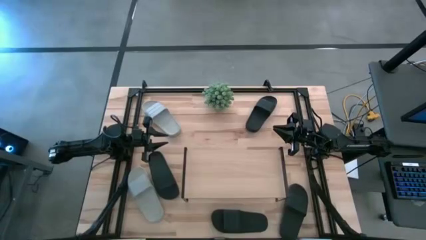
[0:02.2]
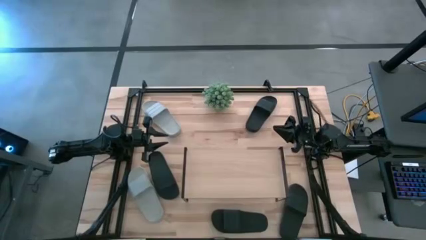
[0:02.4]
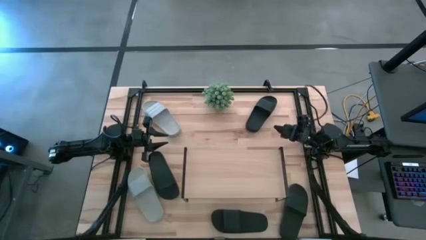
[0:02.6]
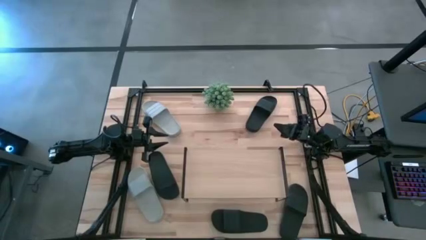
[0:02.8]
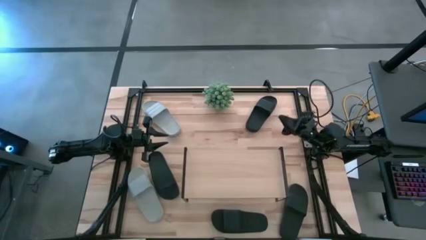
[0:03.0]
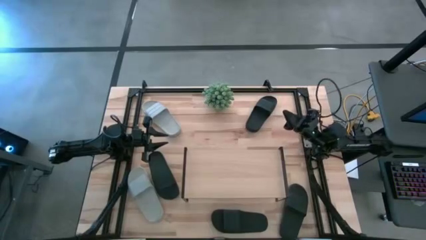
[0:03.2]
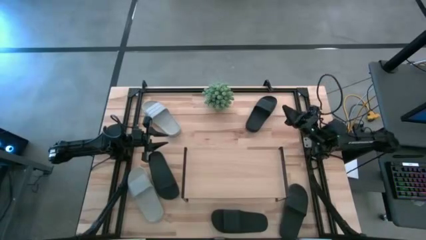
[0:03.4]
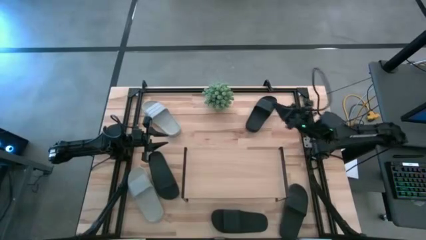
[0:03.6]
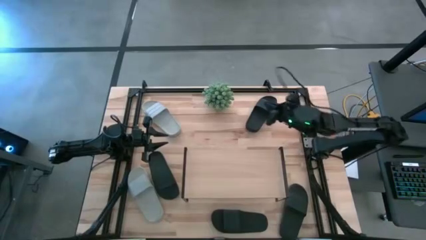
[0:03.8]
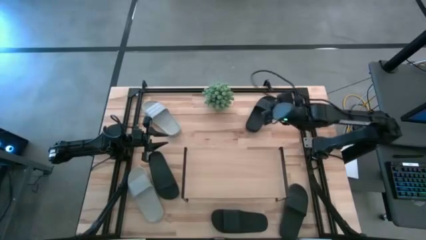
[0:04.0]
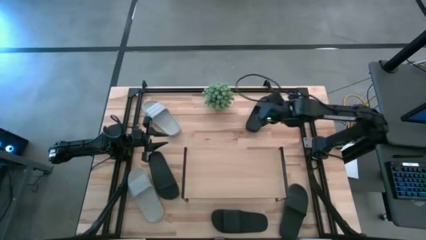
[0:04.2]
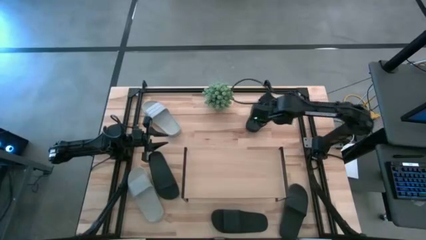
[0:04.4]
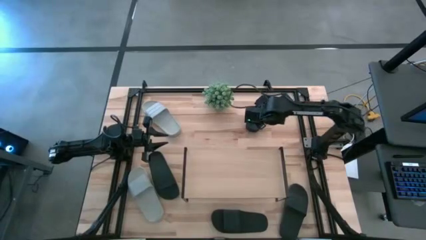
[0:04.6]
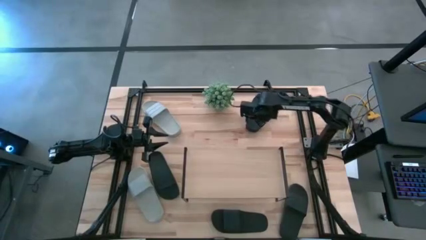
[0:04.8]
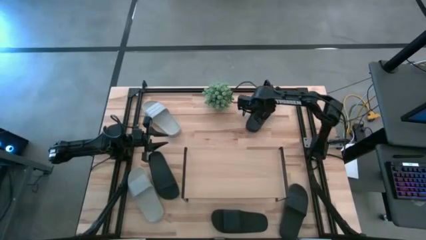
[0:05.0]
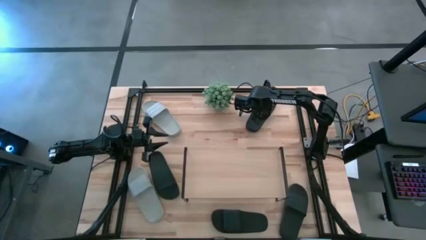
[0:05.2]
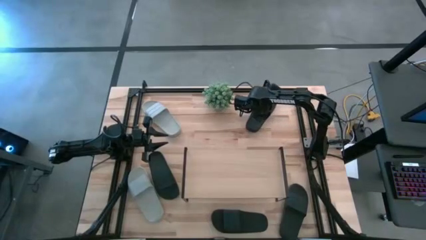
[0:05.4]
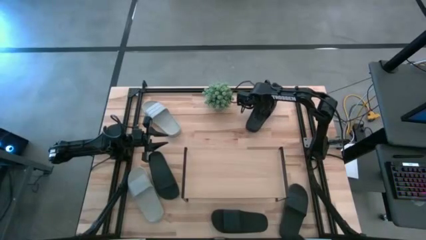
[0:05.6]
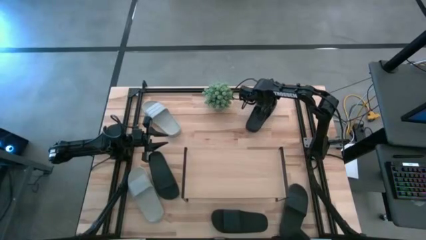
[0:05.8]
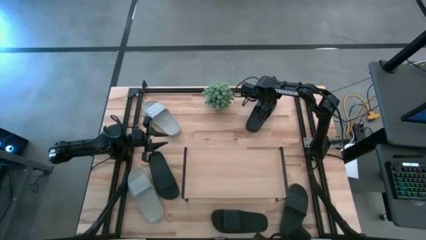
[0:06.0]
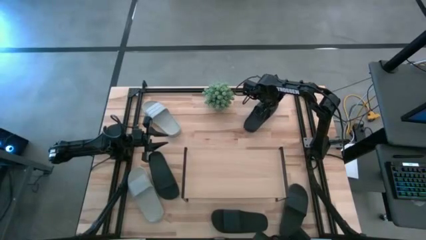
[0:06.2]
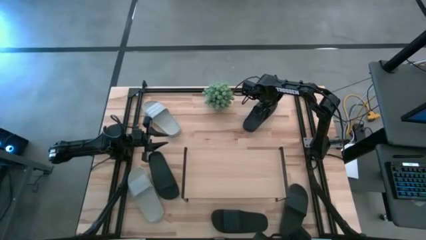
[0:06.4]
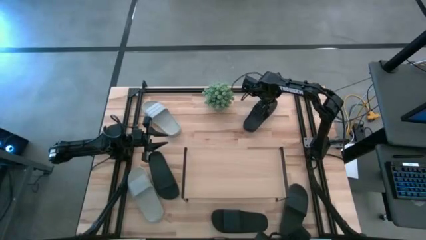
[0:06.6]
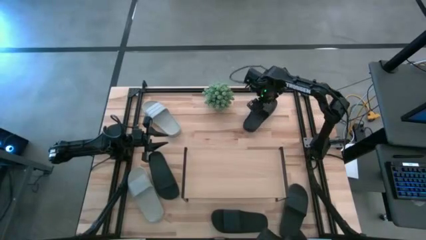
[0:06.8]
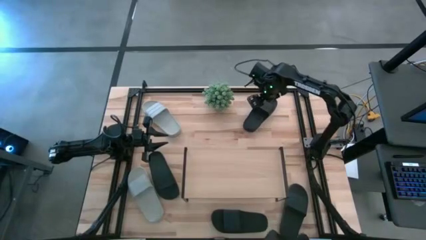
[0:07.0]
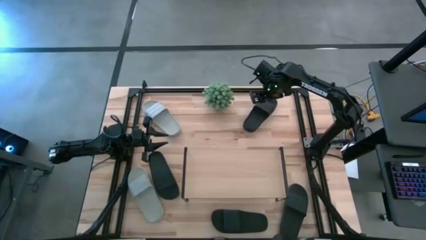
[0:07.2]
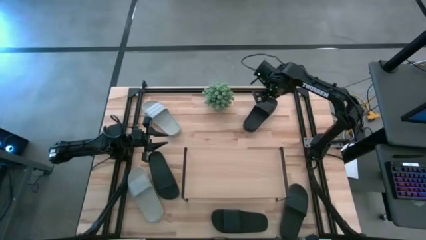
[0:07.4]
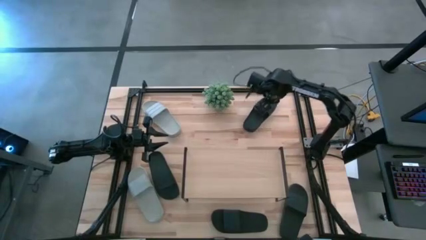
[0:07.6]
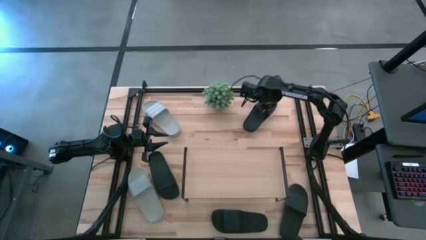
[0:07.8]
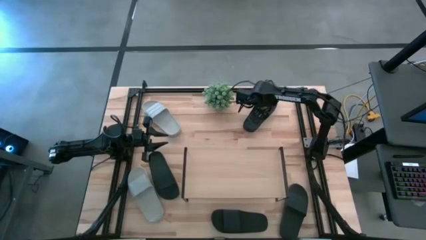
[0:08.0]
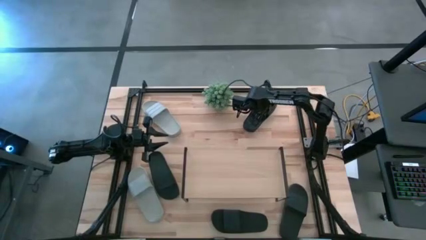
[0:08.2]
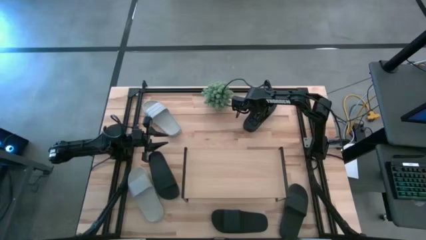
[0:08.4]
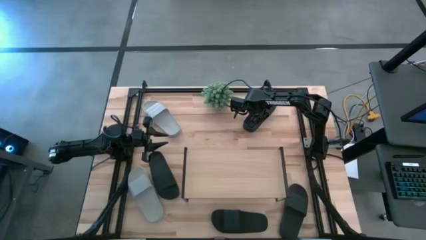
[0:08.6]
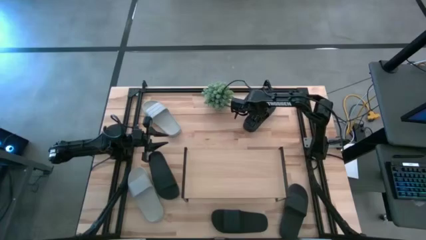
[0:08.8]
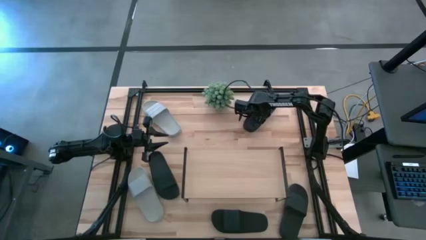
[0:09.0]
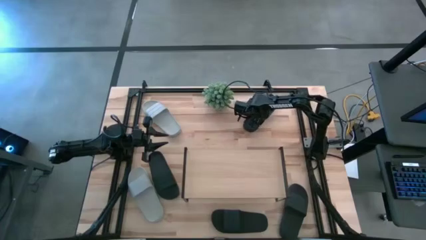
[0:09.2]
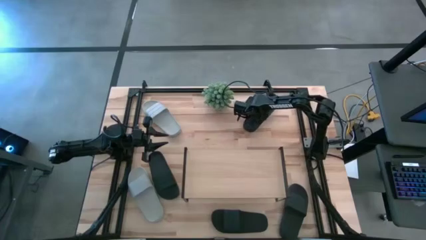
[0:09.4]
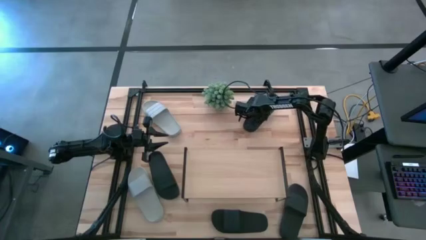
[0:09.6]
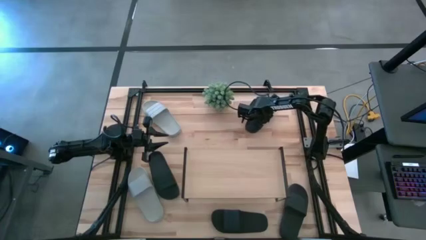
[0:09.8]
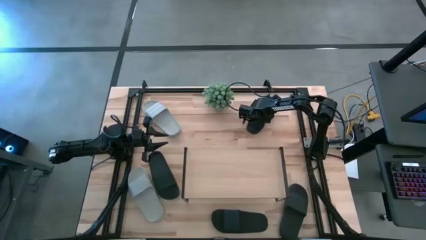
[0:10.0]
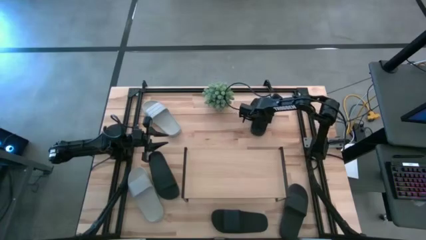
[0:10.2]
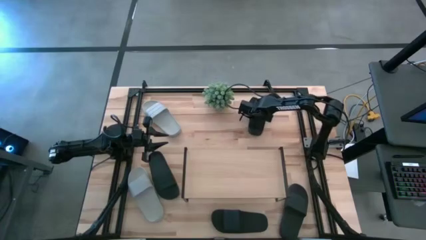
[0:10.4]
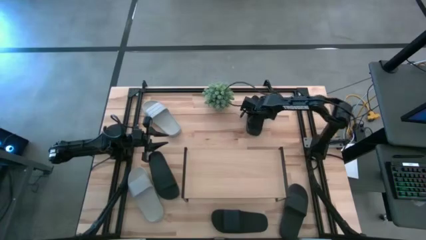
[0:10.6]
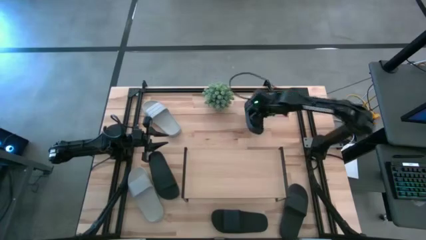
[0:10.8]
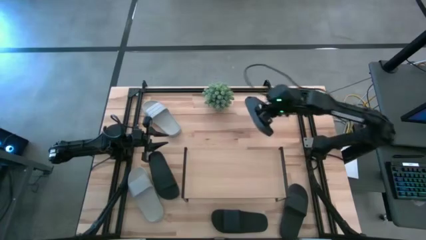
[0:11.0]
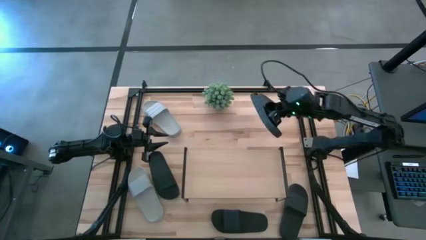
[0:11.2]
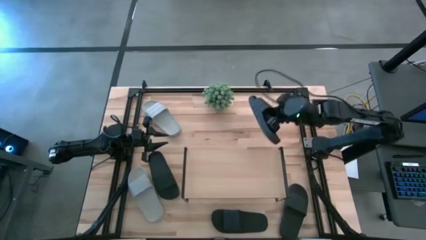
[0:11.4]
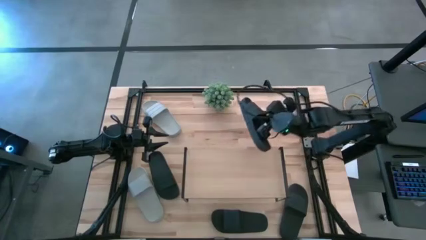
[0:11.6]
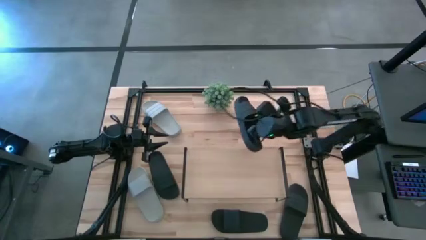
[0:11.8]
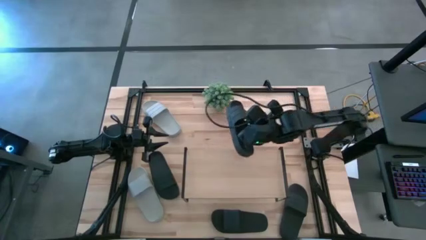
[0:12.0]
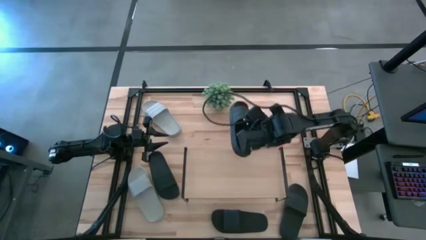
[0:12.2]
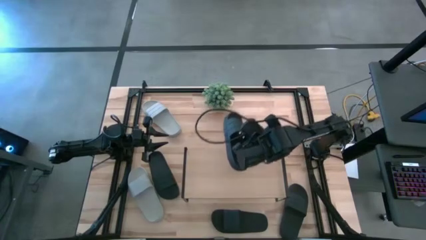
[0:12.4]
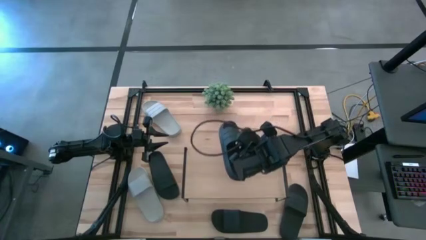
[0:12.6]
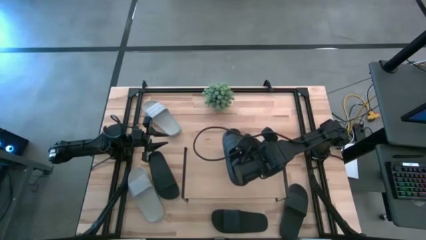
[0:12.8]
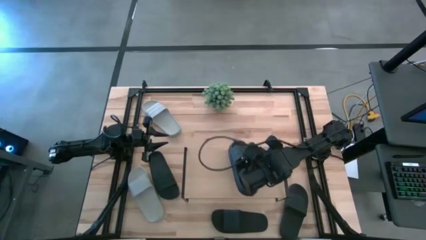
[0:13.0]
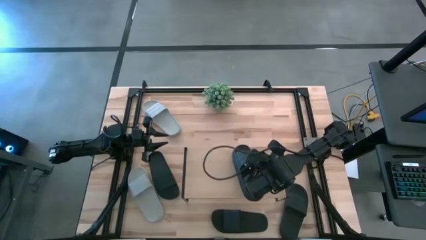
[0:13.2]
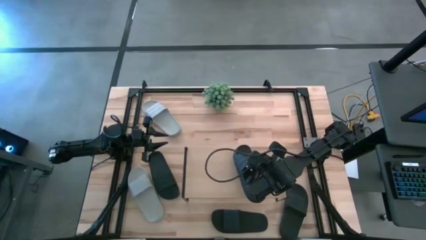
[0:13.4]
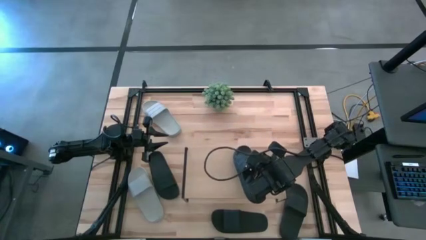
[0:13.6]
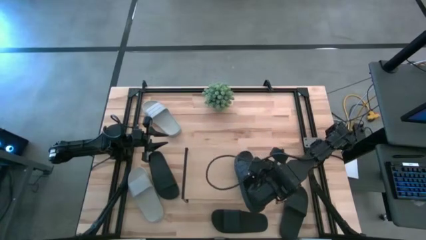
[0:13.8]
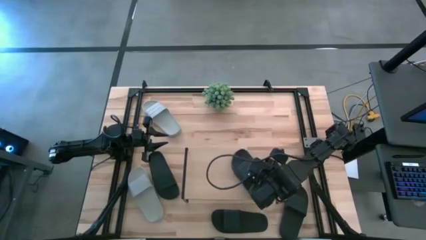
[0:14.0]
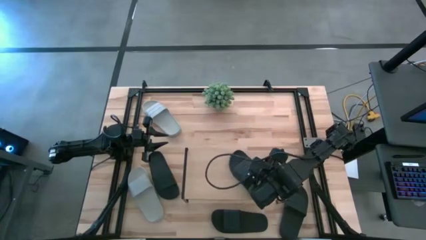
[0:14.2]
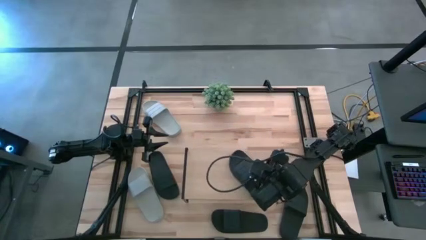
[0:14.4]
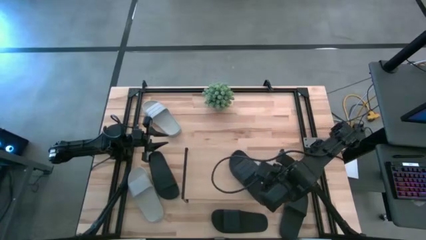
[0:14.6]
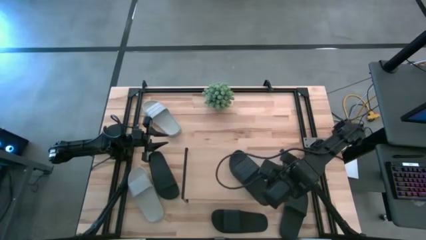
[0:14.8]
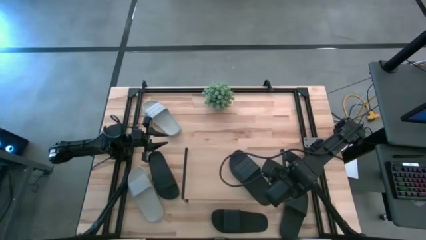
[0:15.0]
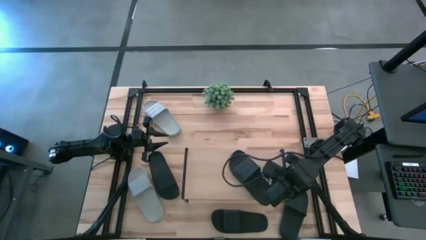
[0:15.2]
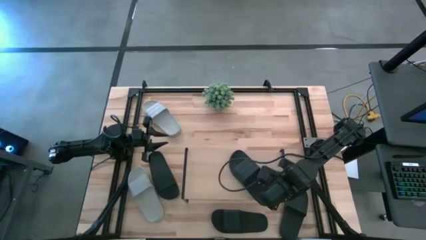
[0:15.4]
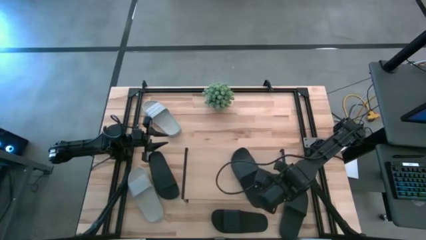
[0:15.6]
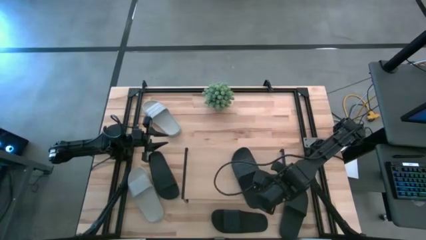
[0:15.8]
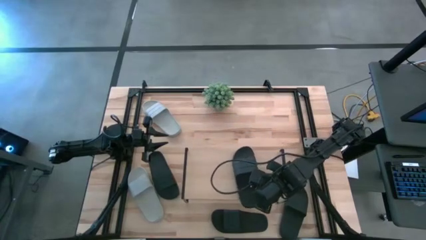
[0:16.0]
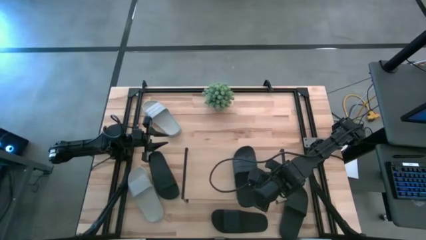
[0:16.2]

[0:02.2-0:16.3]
Task: Pick and place slides into the shelf
Put the black slipper on the shelf
